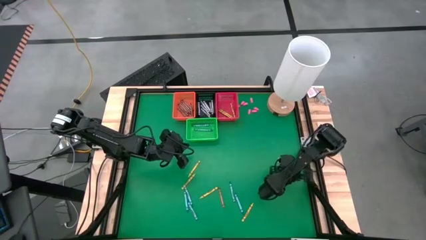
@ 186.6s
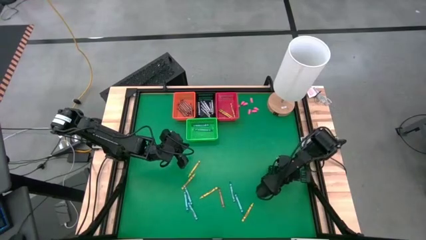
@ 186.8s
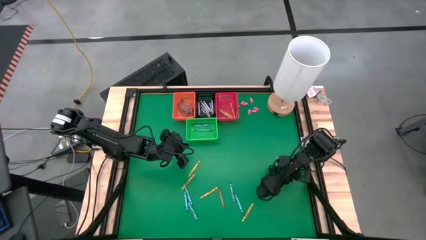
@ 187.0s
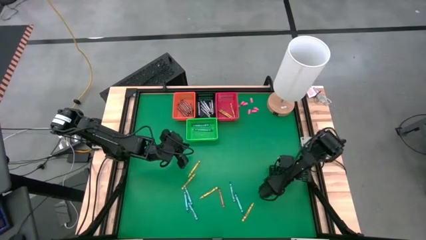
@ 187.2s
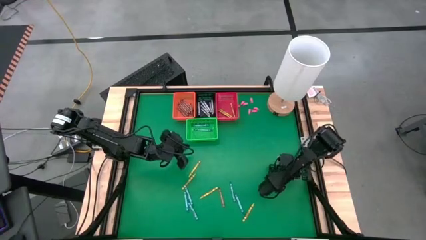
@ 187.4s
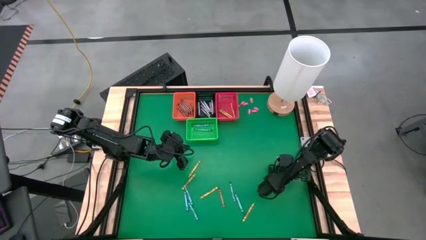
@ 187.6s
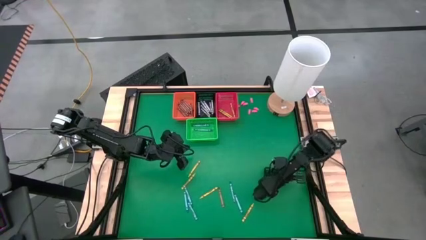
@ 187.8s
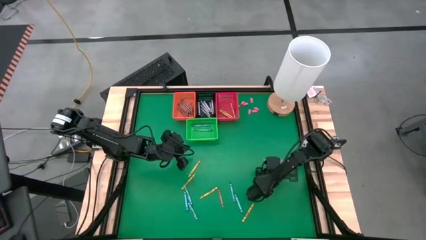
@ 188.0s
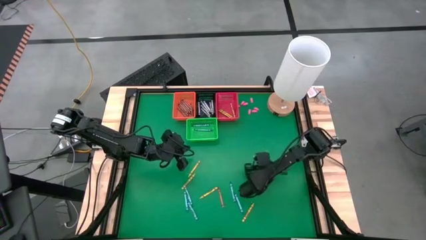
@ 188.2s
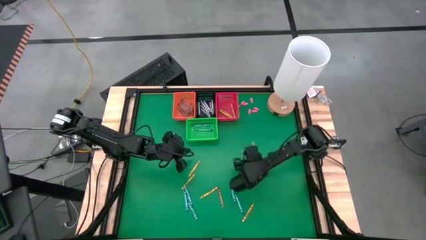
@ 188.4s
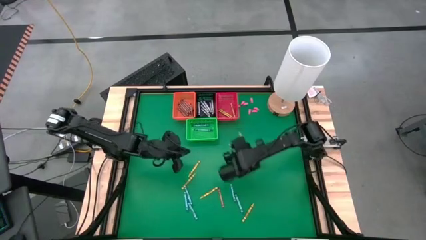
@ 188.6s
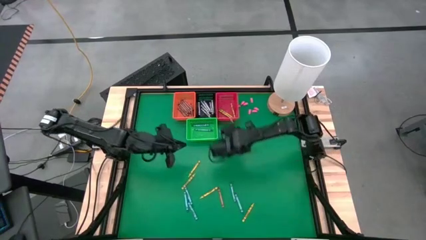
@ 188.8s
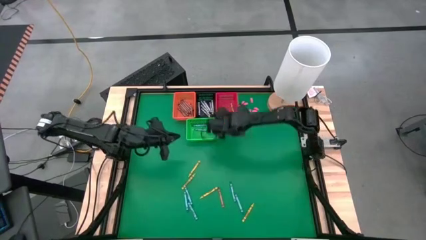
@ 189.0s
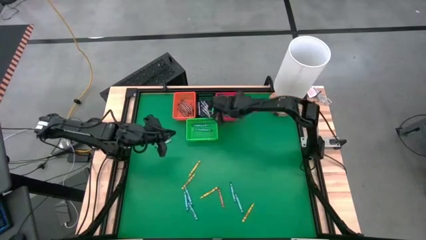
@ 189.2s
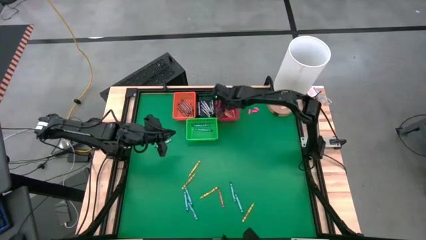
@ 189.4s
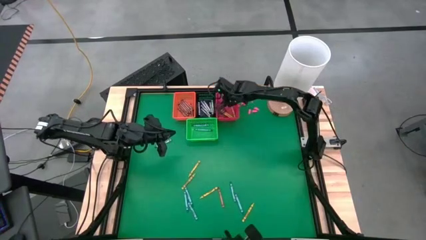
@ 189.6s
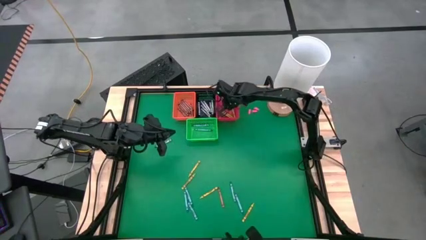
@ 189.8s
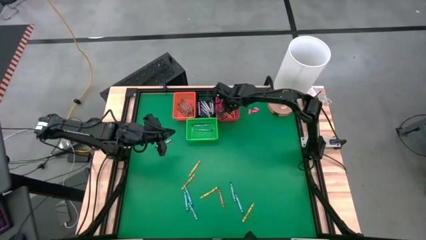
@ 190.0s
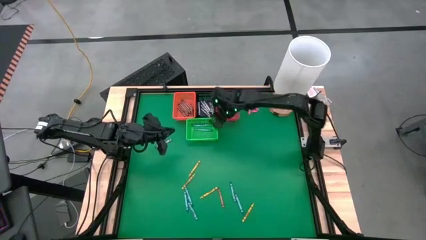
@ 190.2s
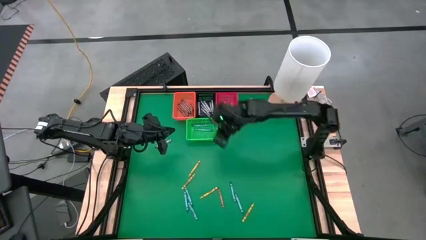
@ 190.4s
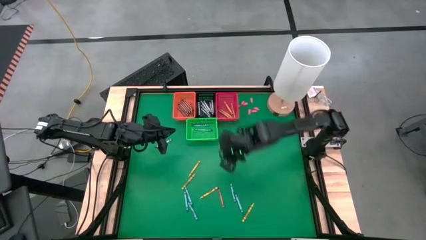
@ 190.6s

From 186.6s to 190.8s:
Task: Sort crayons
Put a yellow crayon in the red basket

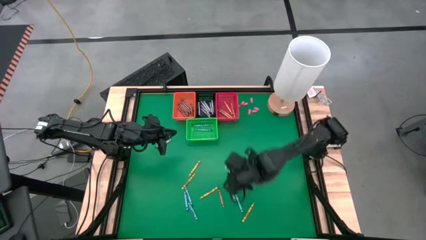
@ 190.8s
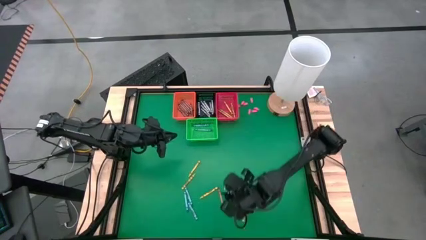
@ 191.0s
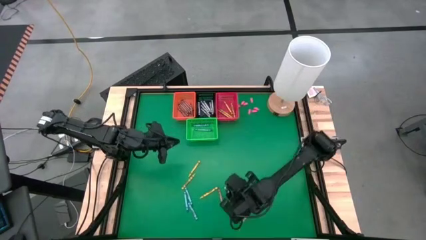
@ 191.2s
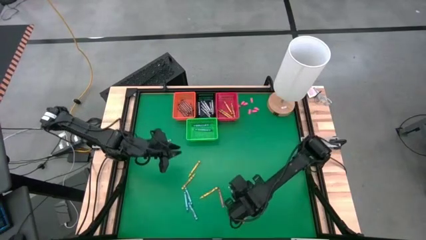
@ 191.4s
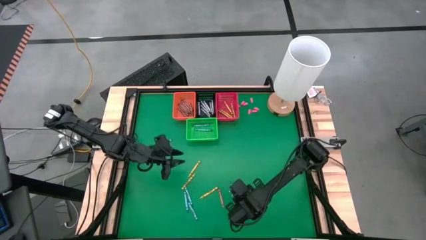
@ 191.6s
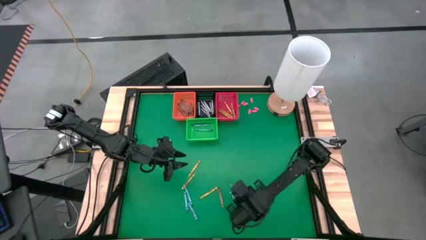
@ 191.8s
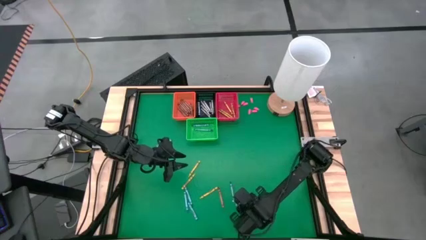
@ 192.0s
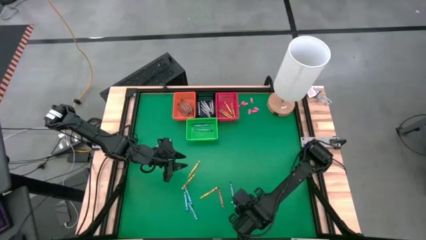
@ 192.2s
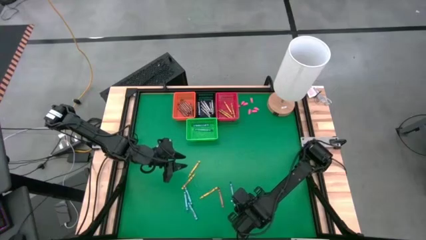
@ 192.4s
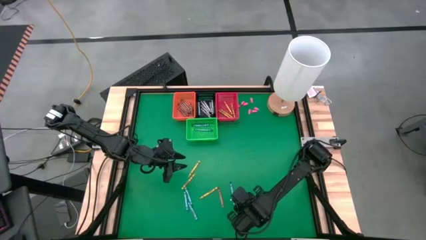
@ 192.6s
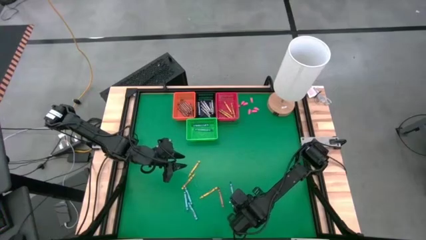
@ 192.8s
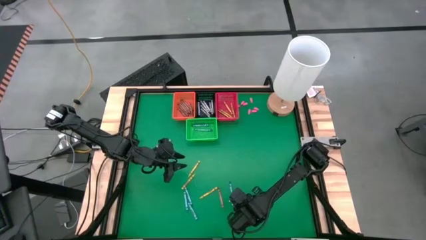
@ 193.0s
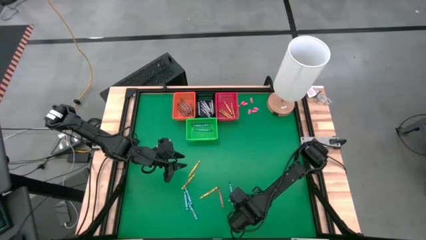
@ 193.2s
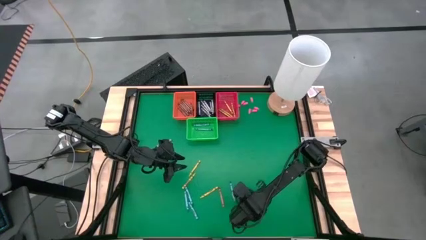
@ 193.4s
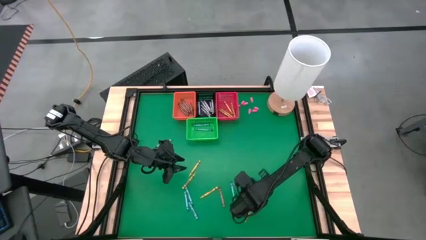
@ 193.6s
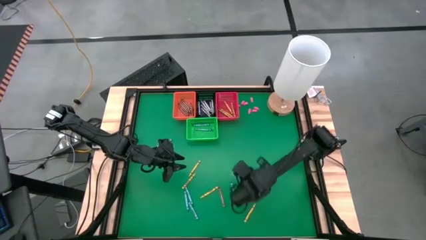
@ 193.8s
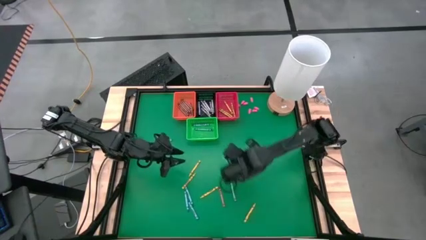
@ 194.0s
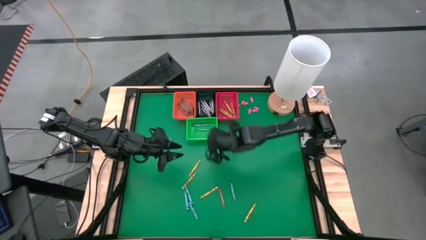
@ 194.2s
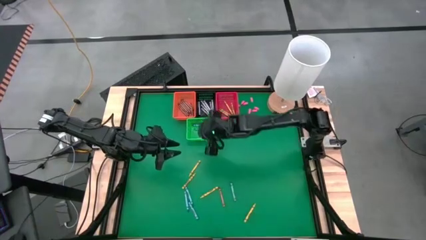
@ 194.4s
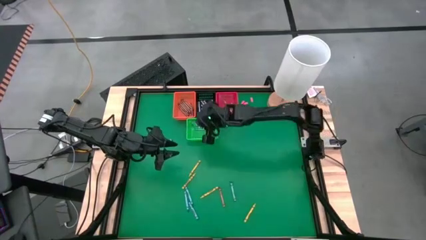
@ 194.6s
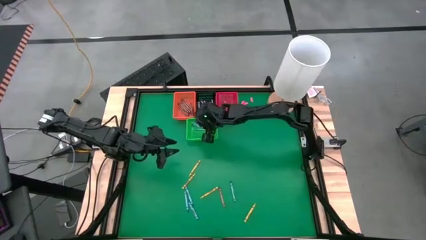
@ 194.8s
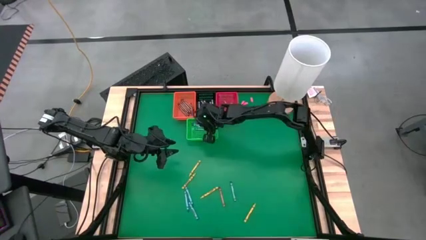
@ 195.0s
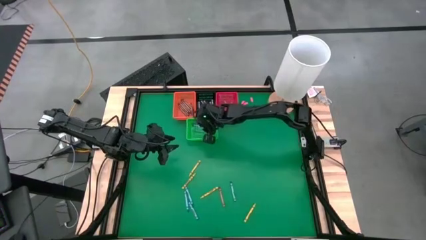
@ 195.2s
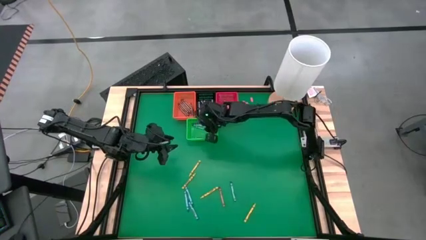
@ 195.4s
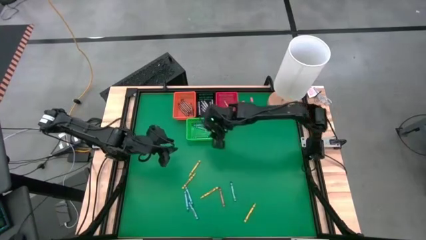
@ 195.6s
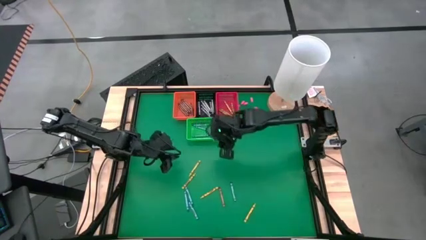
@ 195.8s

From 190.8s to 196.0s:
Put a blue crayon in the green basket

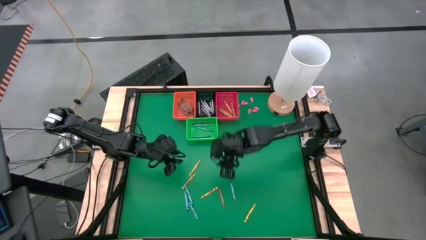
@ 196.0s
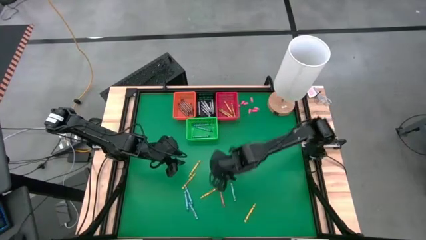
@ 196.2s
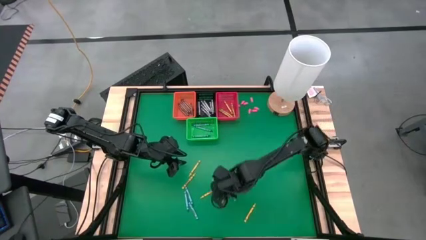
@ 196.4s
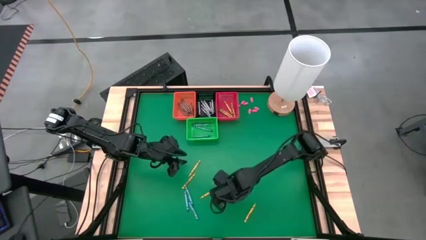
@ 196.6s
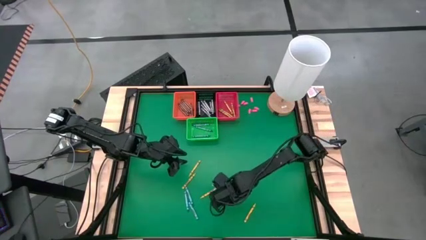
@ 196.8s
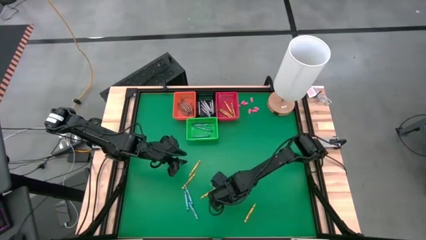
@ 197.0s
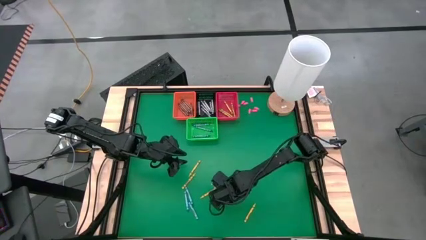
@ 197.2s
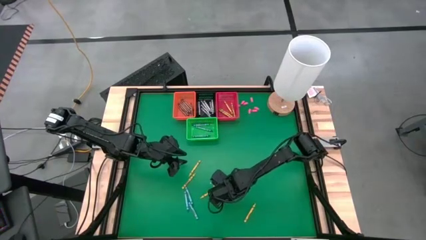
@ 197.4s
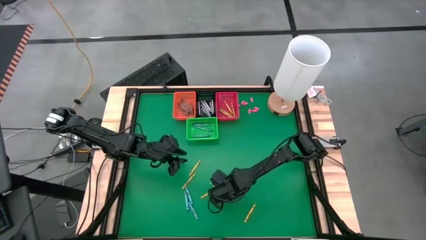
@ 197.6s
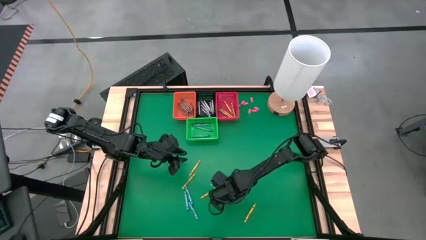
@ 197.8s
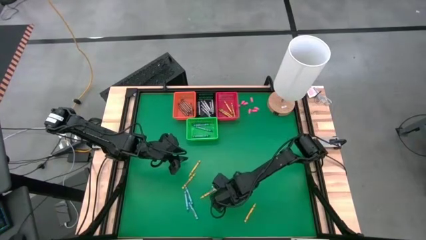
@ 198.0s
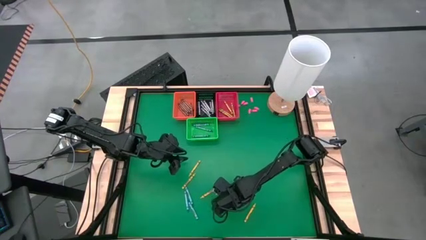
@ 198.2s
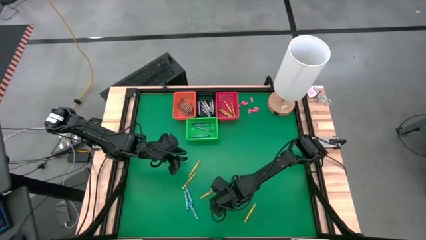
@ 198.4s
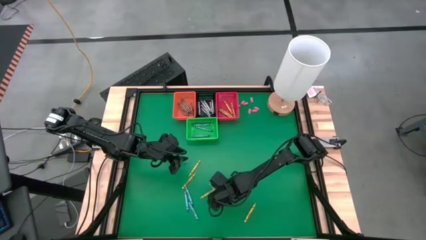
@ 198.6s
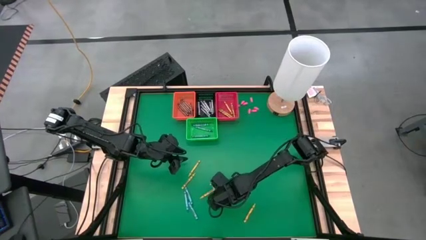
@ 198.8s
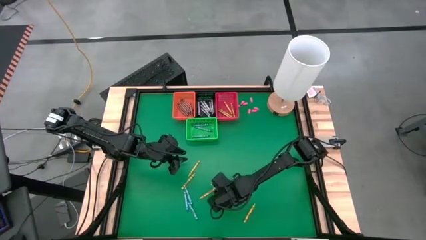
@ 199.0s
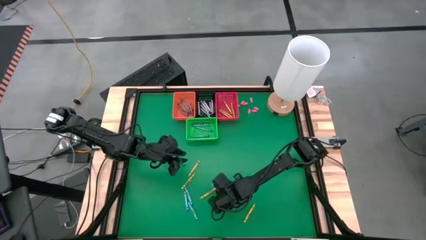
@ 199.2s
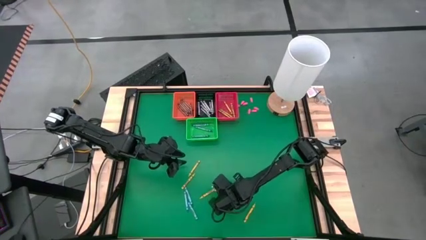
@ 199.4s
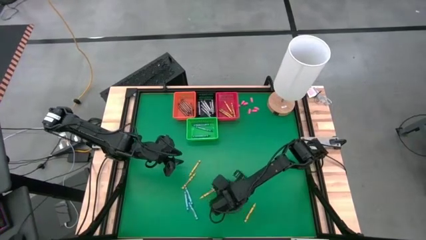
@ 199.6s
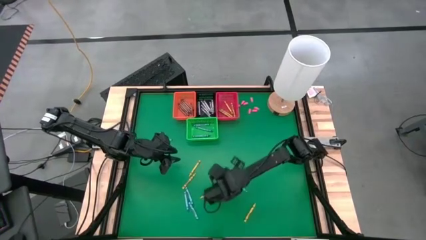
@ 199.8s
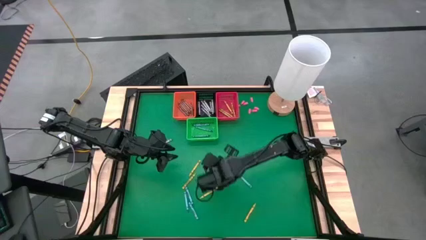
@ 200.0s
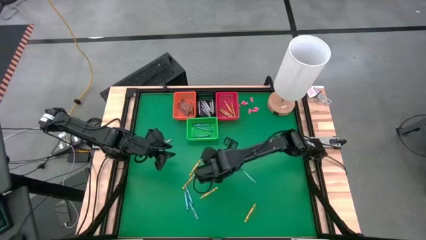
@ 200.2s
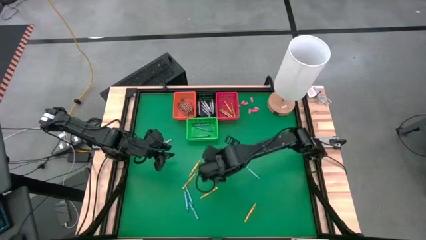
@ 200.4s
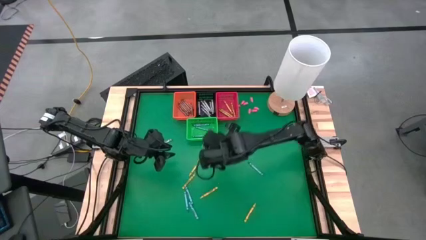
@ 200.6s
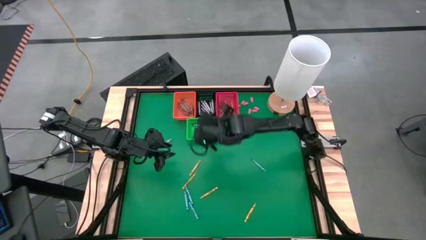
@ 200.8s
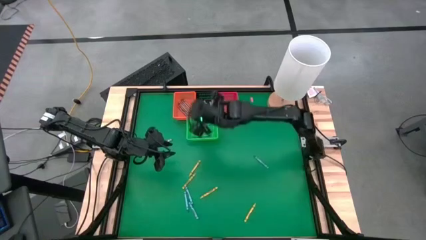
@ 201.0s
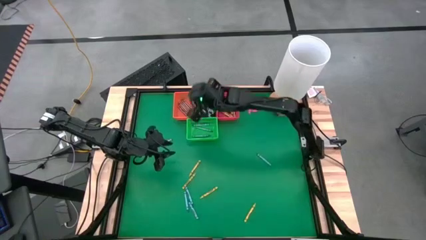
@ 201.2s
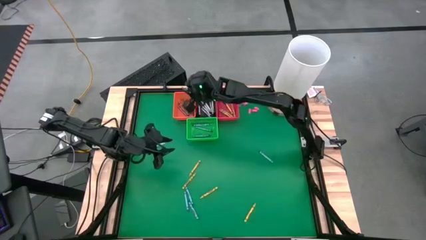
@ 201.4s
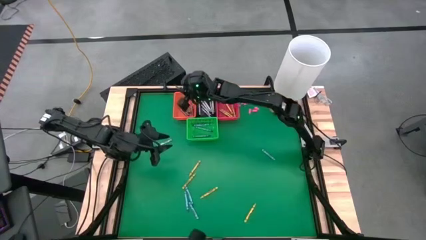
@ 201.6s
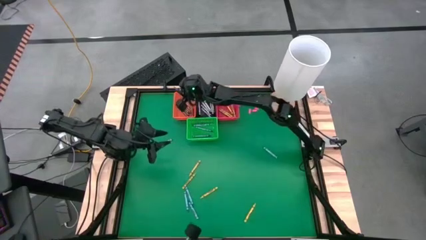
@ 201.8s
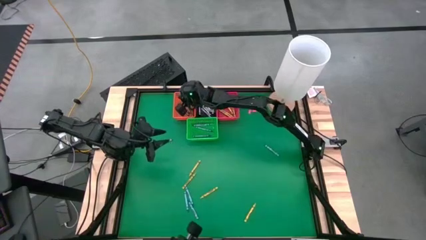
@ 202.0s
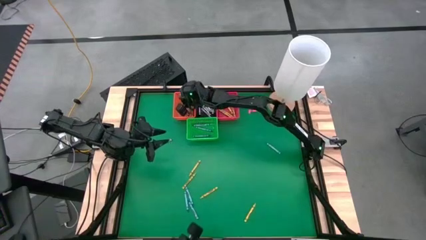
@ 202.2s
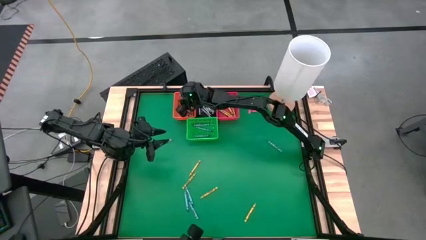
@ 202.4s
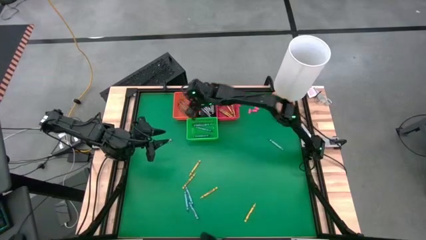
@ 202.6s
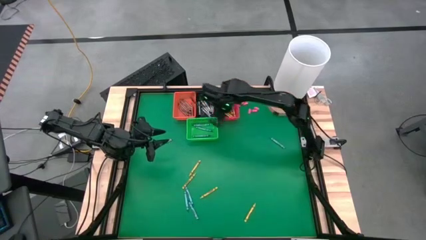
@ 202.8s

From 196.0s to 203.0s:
Put a red crayon in the orange basket
